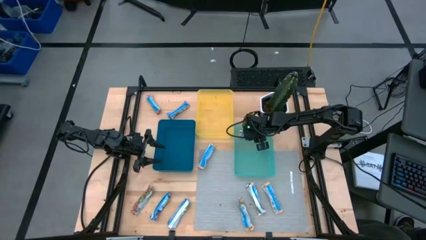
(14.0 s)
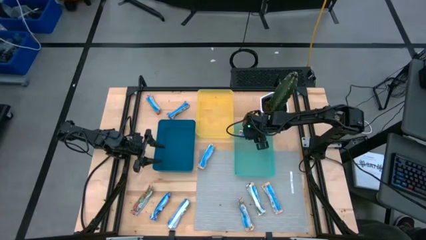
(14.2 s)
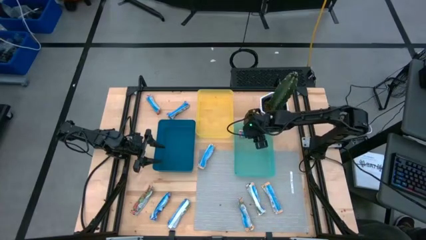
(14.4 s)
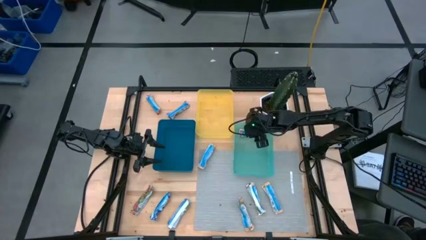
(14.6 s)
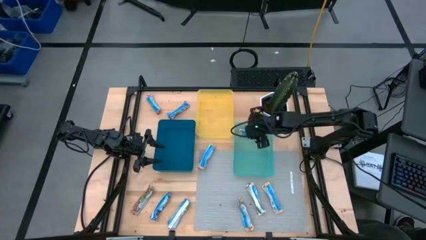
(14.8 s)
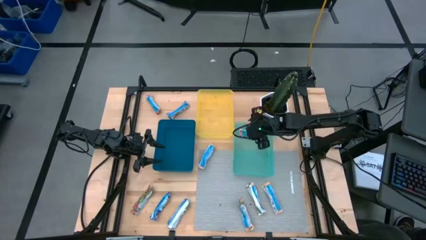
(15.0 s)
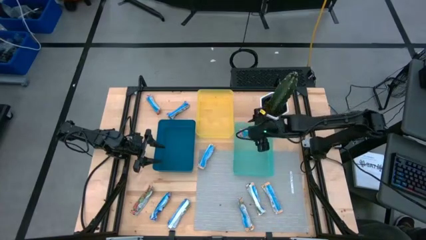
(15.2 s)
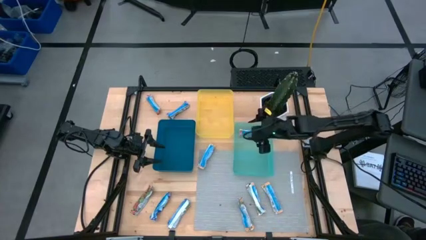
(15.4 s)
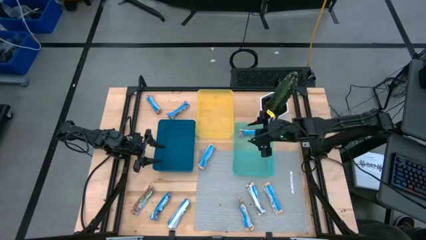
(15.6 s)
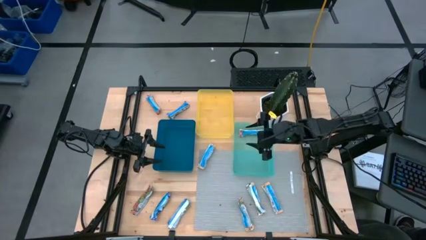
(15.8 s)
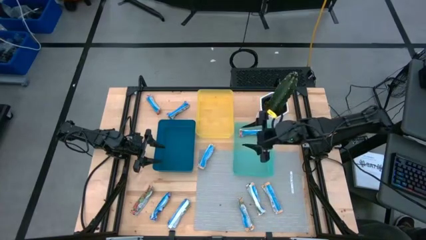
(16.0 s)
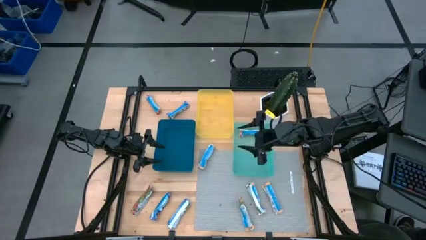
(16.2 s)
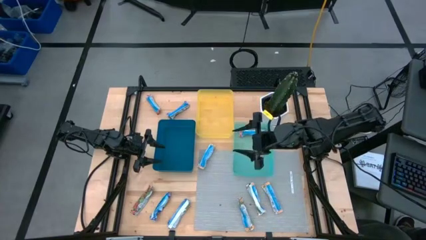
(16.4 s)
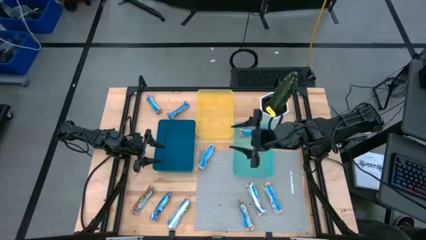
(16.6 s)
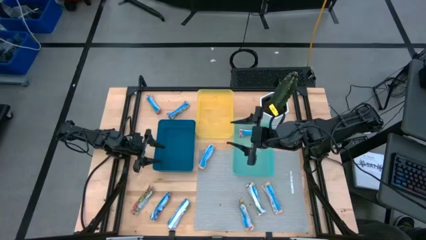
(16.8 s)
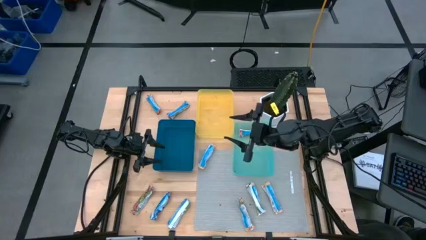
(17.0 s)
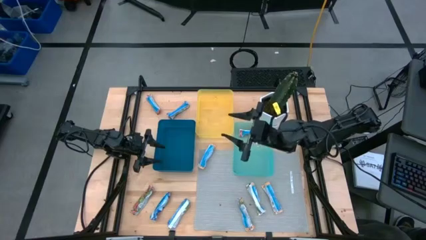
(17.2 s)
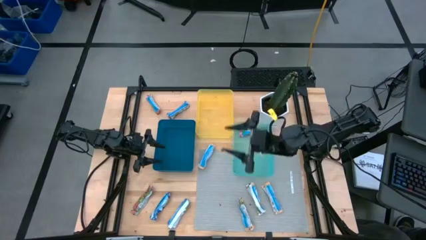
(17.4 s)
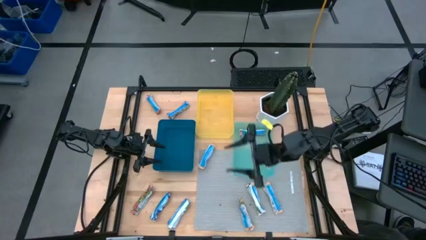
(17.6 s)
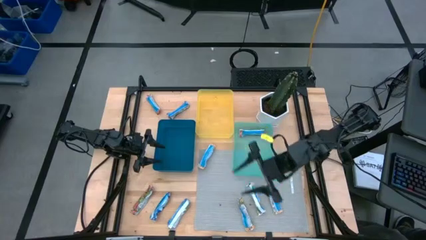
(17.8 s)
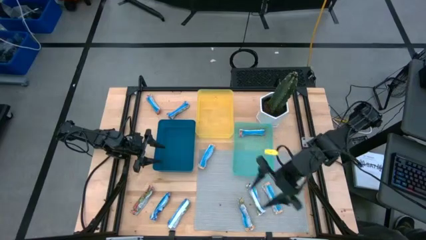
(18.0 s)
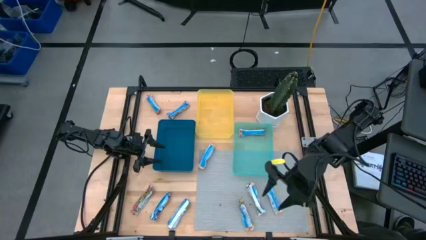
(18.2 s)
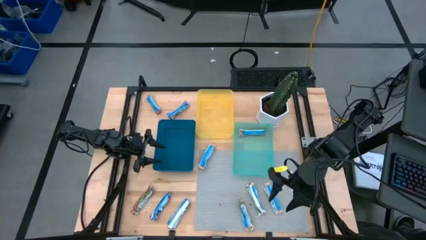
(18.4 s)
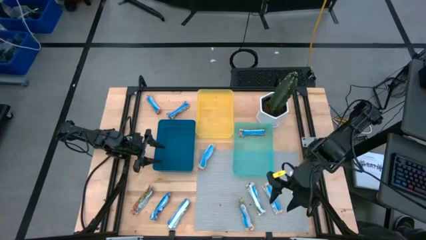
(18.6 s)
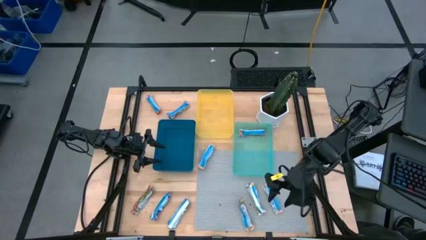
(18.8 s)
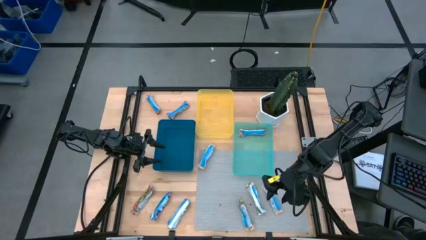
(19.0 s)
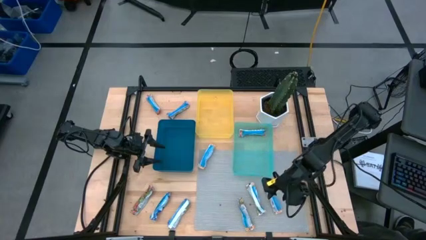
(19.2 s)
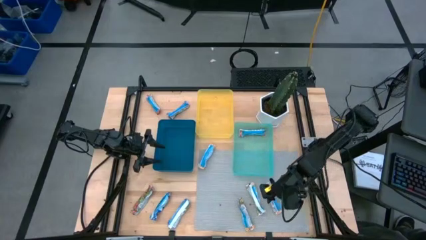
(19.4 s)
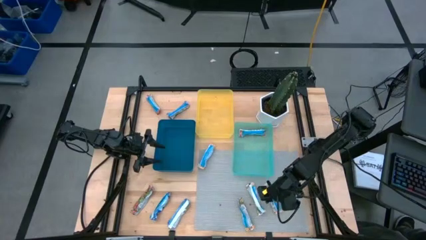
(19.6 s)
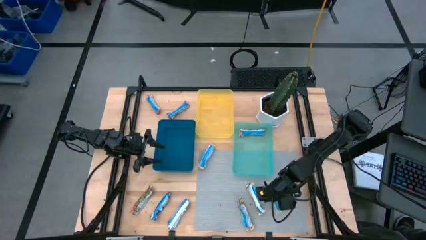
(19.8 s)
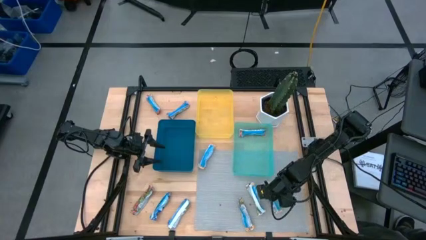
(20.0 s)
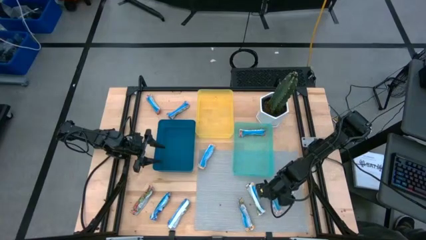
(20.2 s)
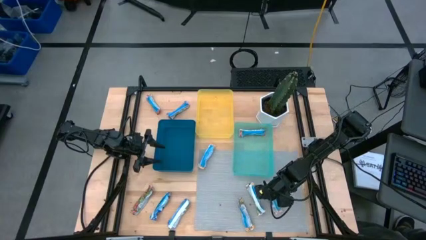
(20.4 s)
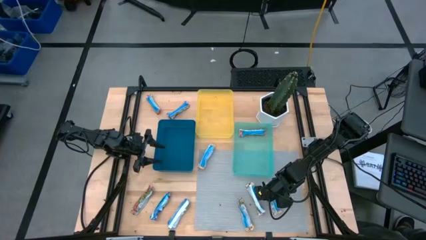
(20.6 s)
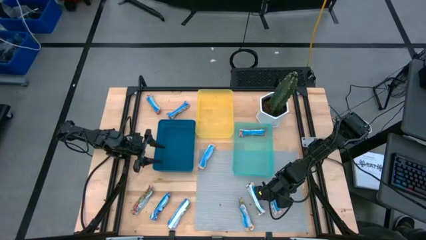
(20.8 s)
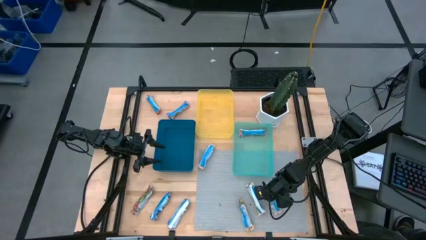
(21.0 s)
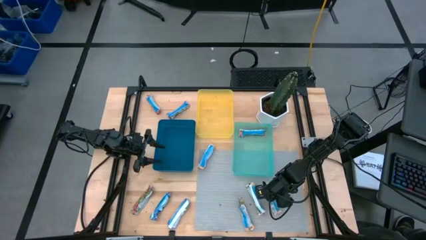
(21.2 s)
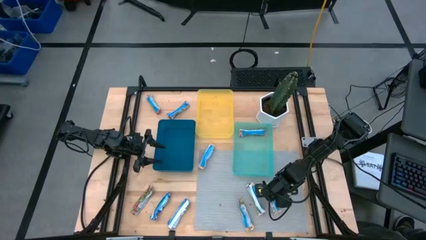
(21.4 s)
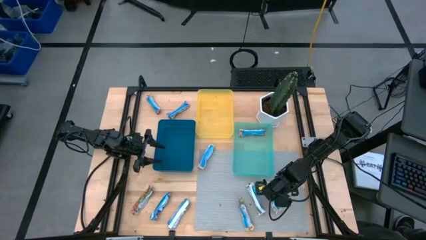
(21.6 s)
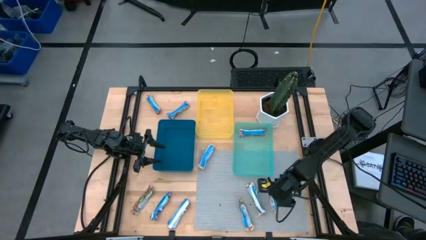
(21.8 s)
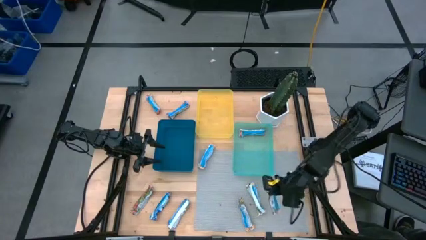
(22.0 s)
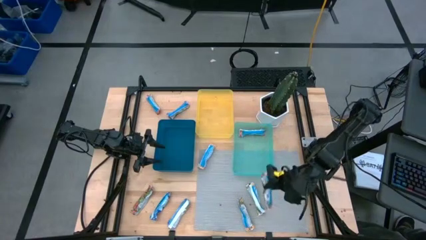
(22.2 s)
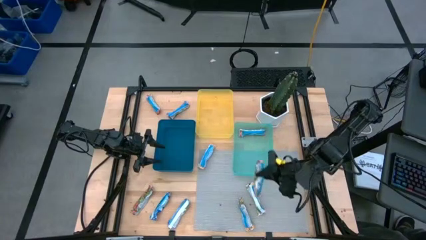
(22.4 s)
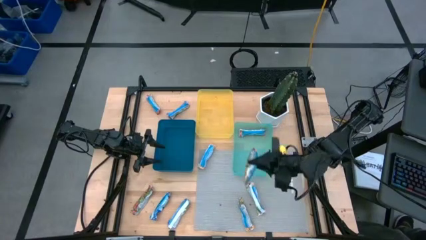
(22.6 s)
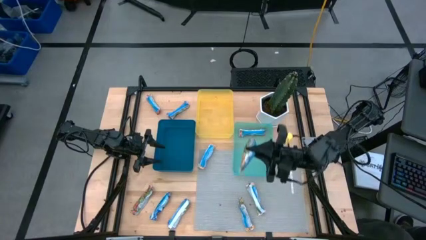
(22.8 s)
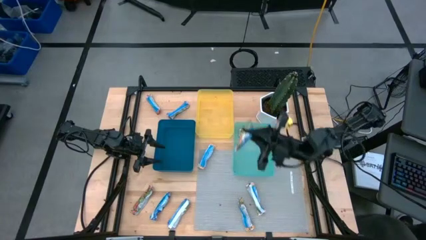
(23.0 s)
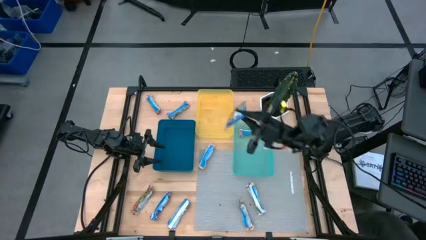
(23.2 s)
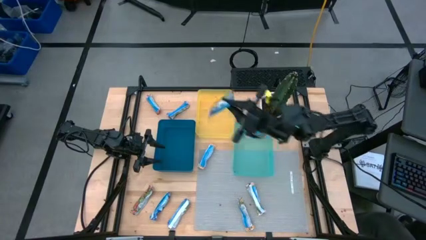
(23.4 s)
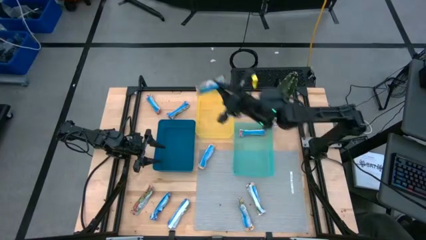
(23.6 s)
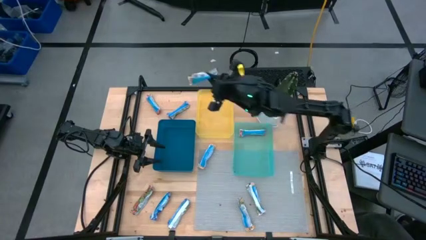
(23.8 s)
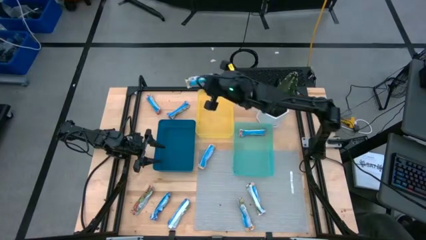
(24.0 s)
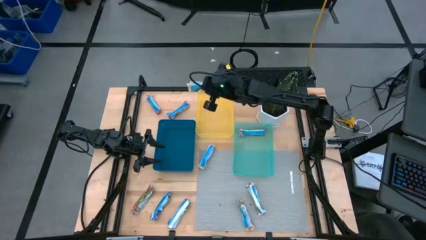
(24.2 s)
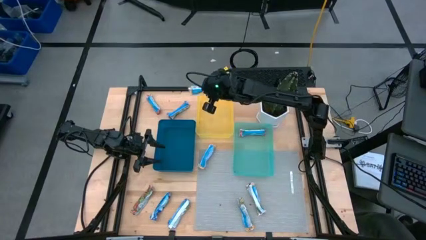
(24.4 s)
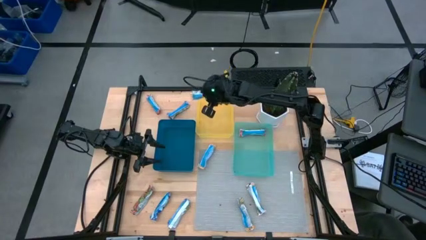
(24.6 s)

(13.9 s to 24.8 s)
Task: Pick and place Granola Bars by type
Put the yellow granola bar into the yellow bin
